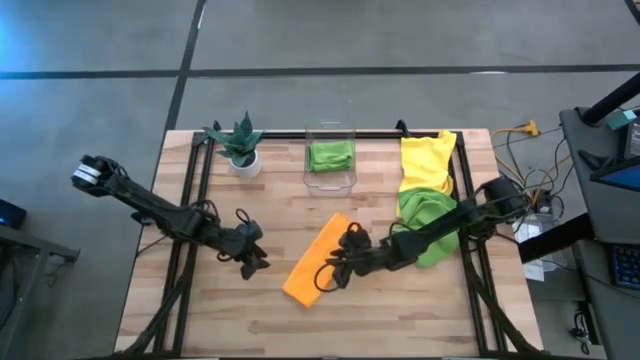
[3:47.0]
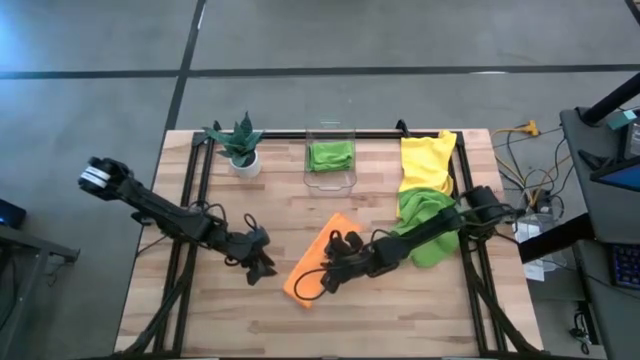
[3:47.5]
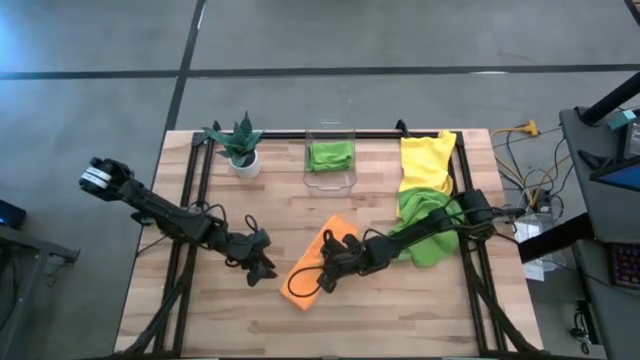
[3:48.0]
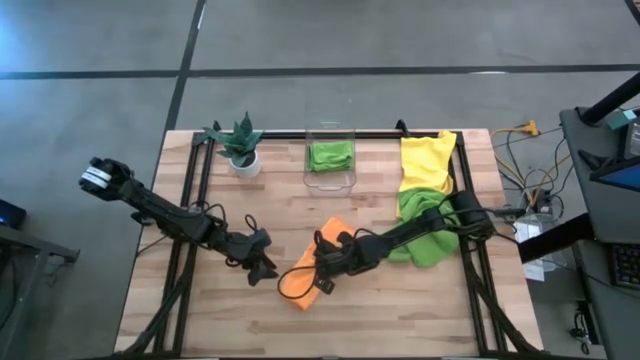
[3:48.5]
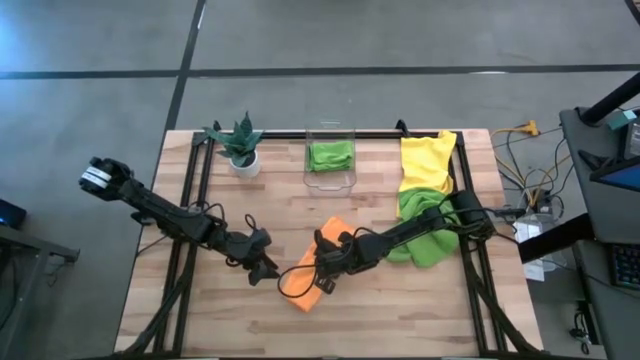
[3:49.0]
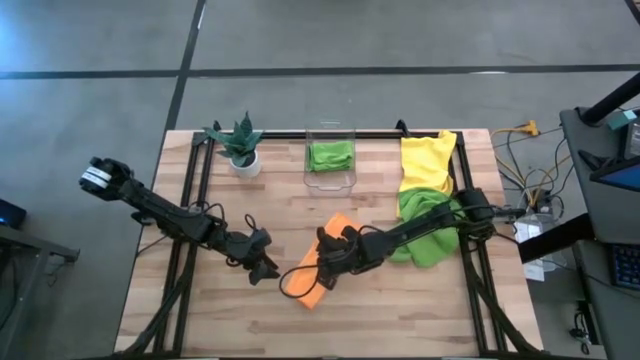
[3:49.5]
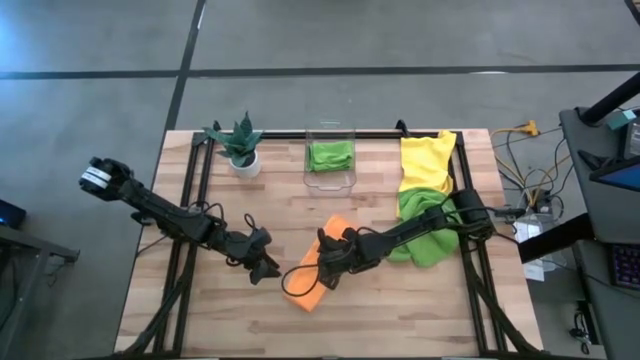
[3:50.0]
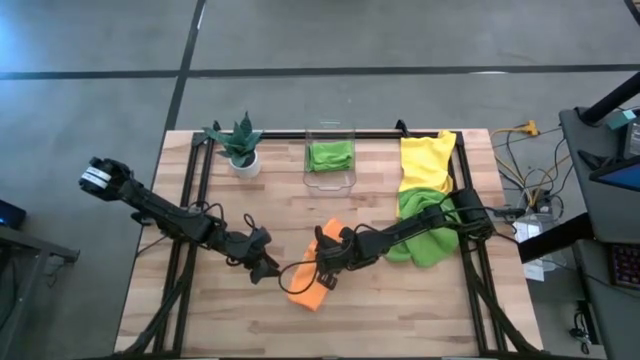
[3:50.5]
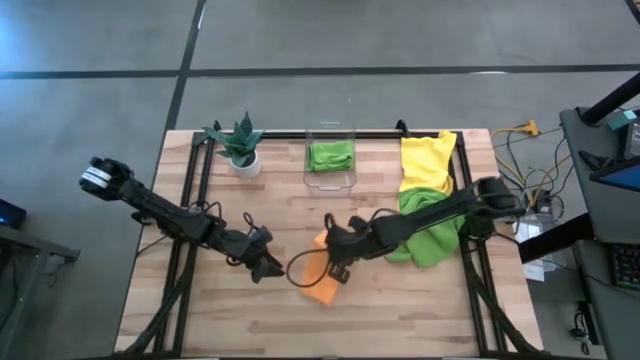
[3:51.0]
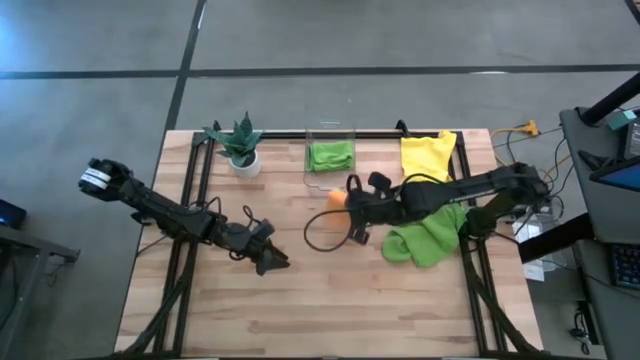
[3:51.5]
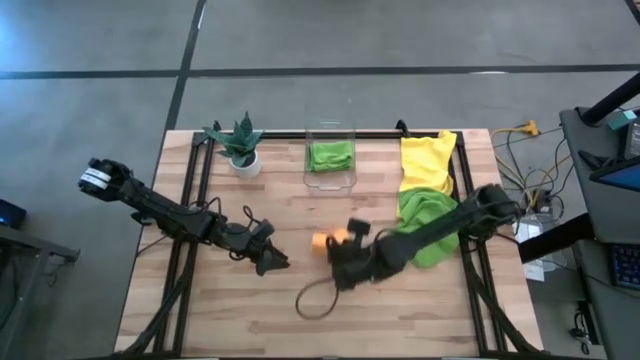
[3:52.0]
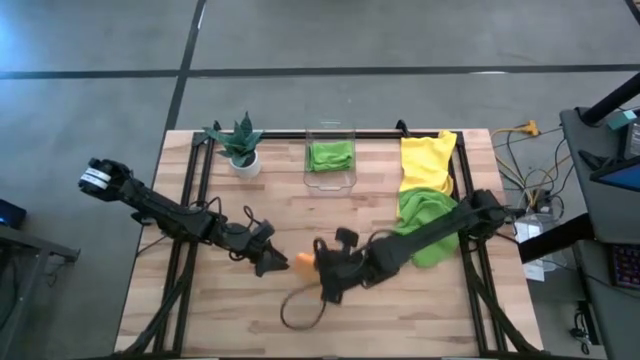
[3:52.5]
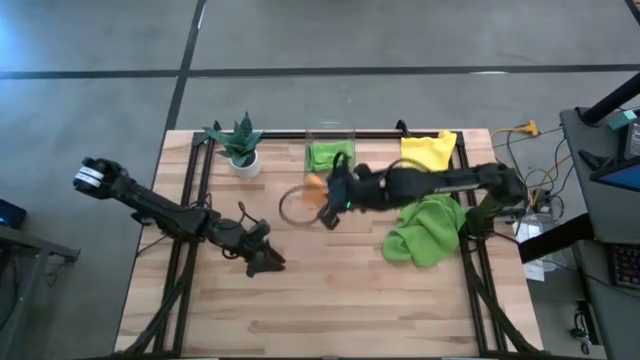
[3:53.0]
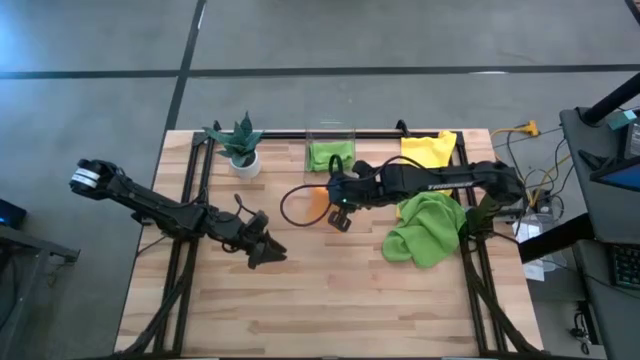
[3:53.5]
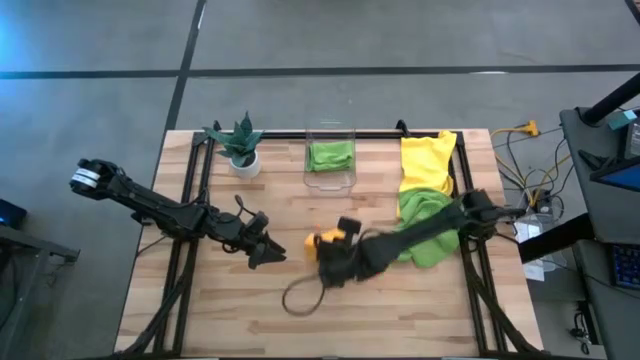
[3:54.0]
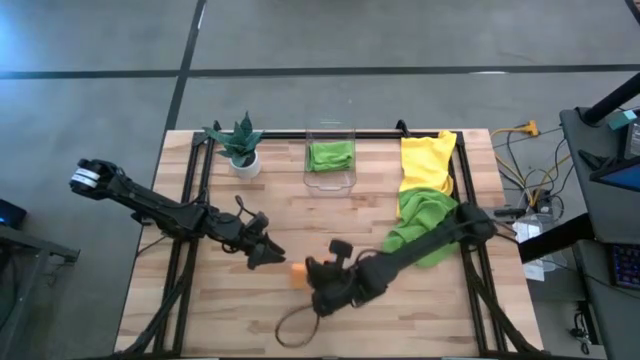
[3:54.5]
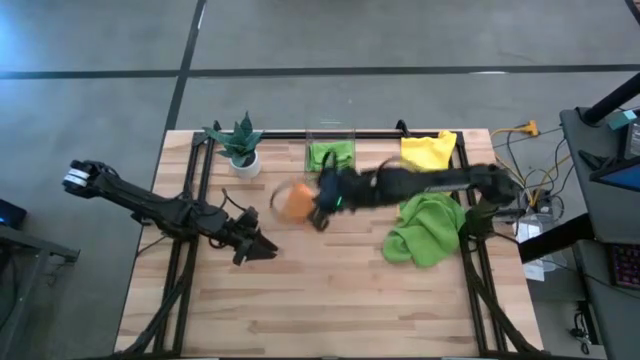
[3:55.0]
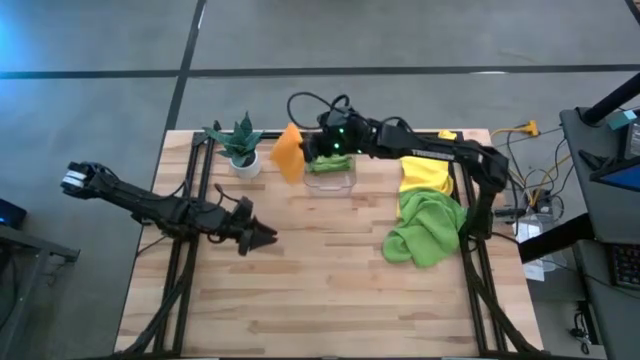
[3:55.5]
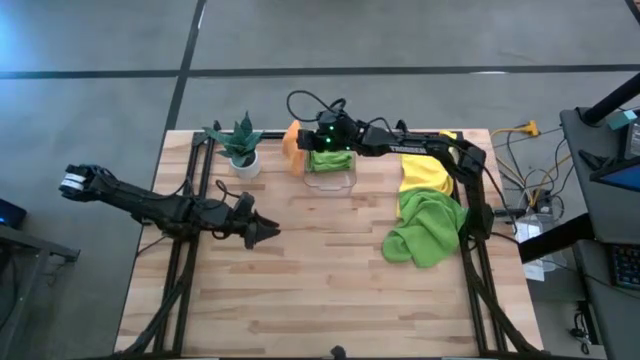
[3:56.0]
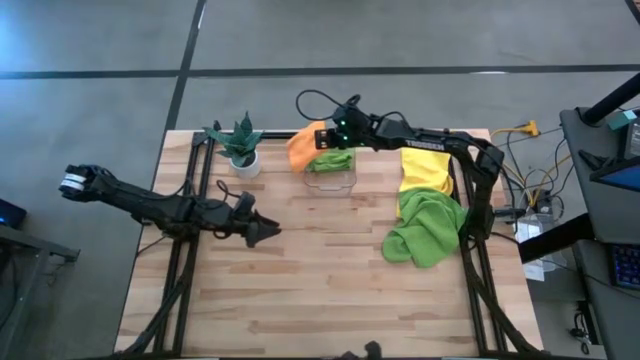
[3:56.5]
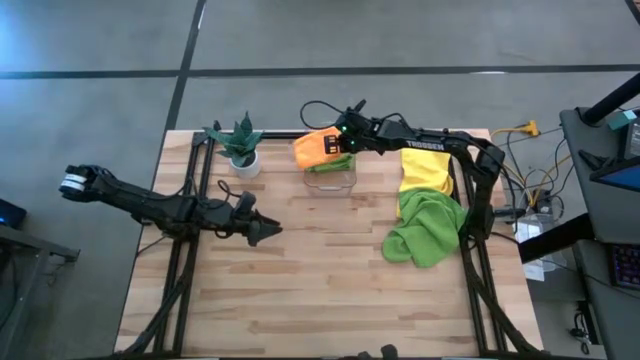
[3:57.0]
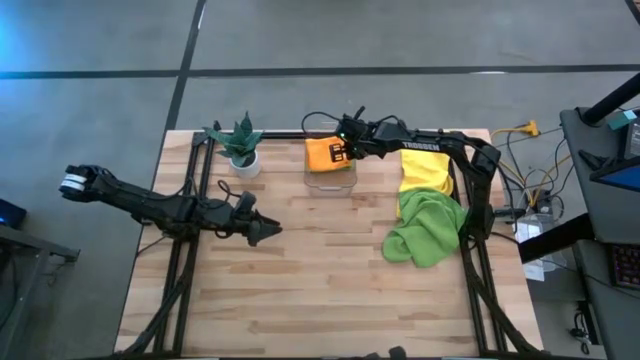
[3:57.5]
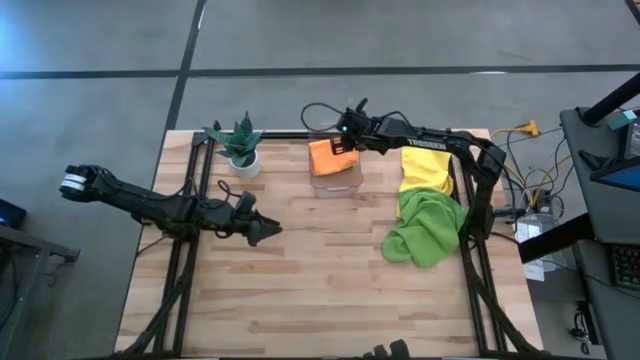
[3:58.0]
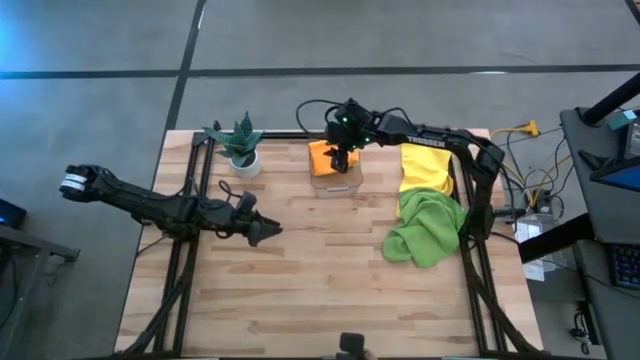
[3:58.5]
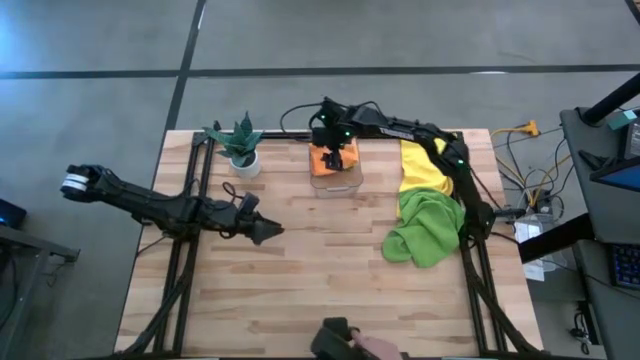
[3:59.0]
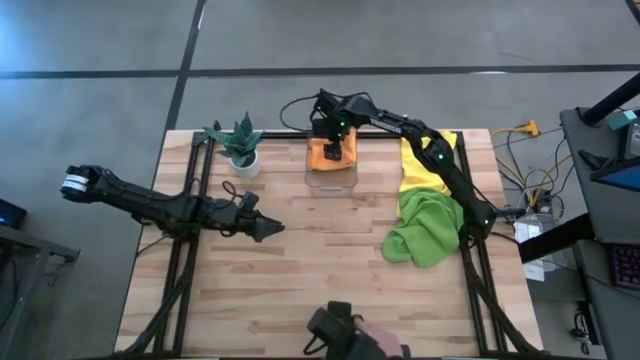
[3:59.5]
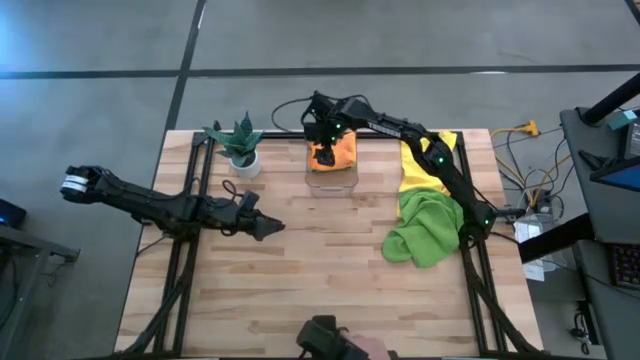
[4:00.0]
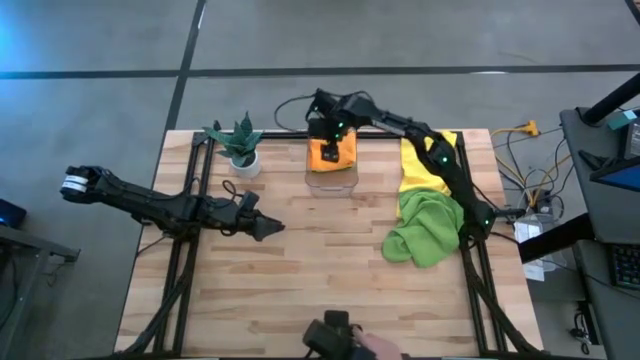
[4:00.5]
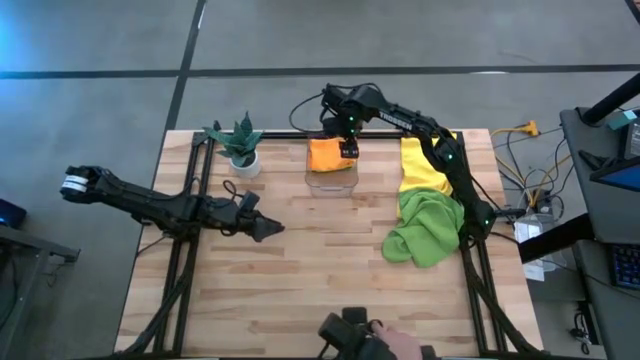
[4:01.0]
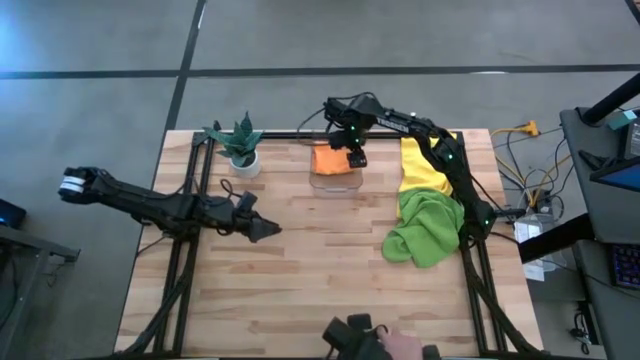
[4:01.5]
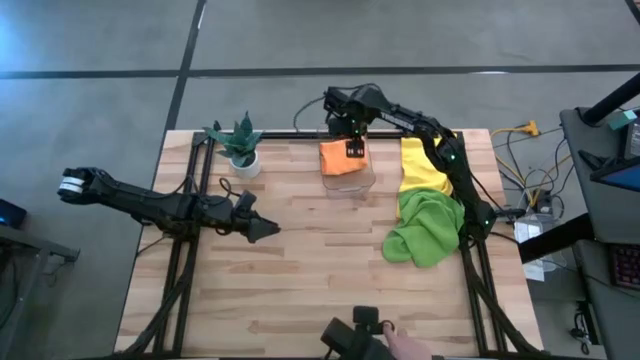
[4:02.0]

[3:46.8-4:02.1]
Task: Fold microfiber towels
Put the folded orange towel into the transparent bin

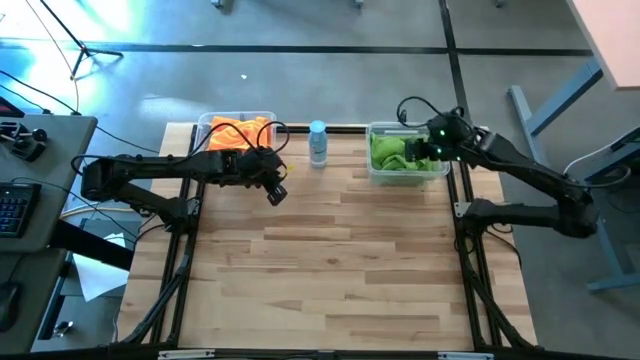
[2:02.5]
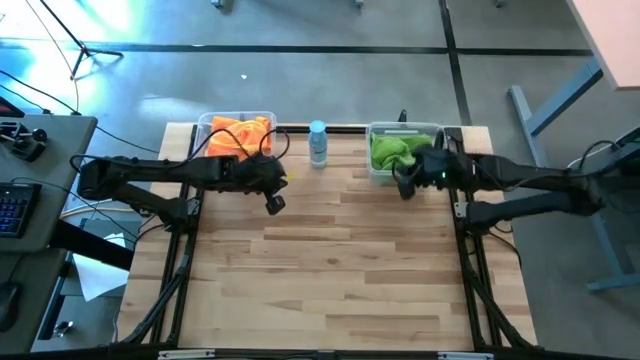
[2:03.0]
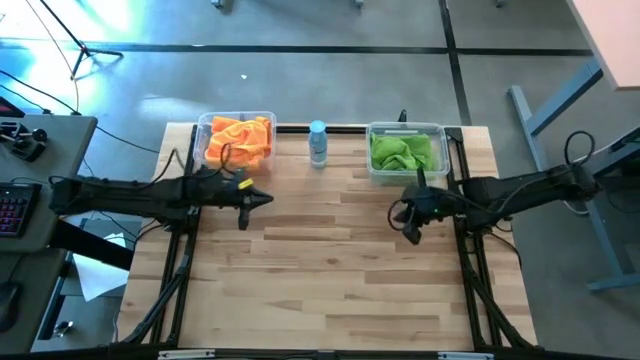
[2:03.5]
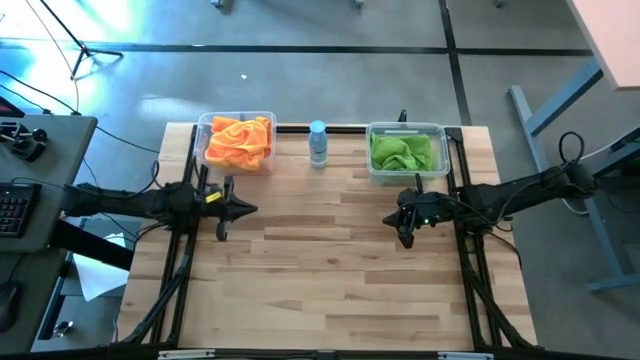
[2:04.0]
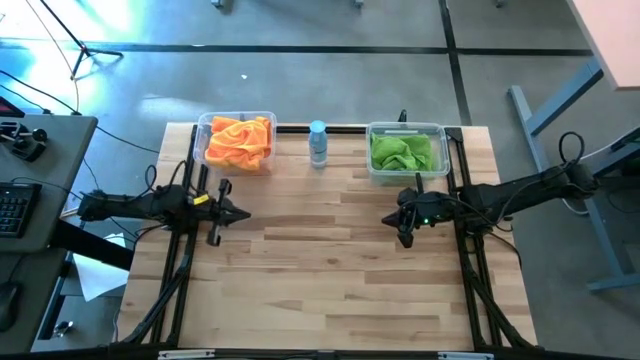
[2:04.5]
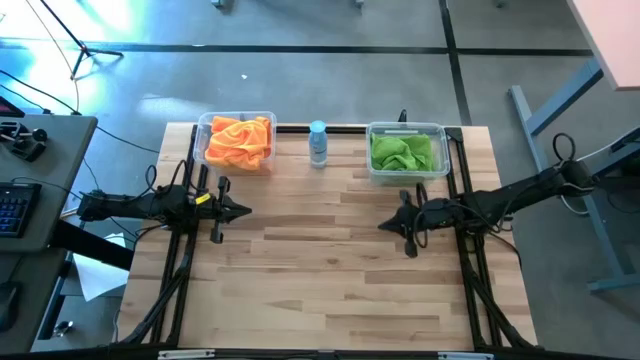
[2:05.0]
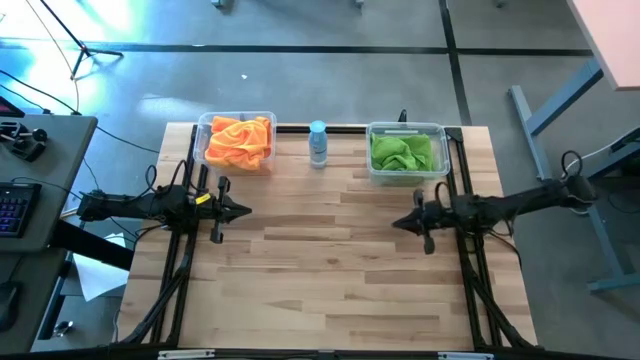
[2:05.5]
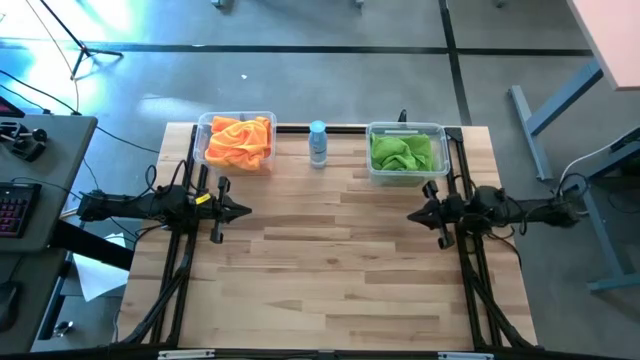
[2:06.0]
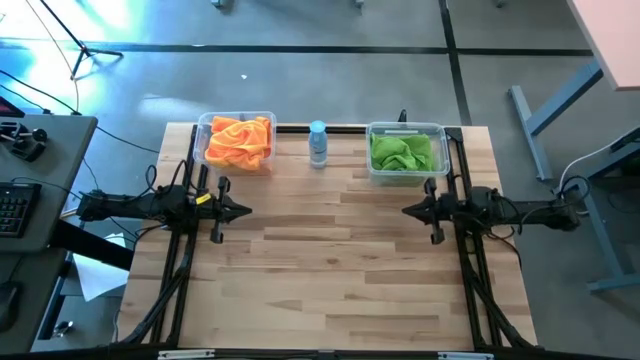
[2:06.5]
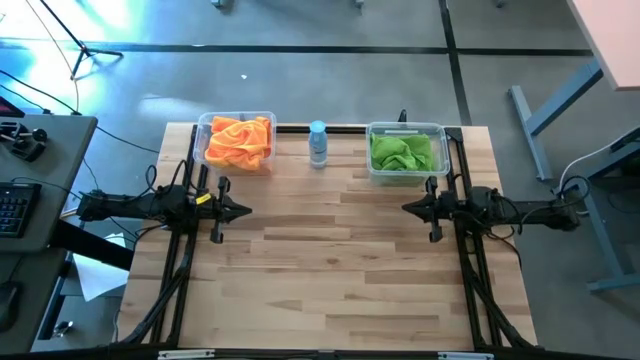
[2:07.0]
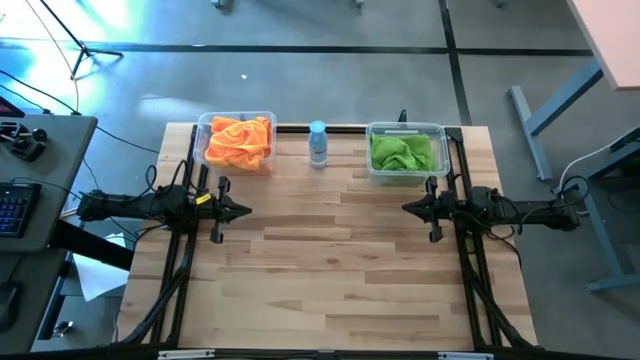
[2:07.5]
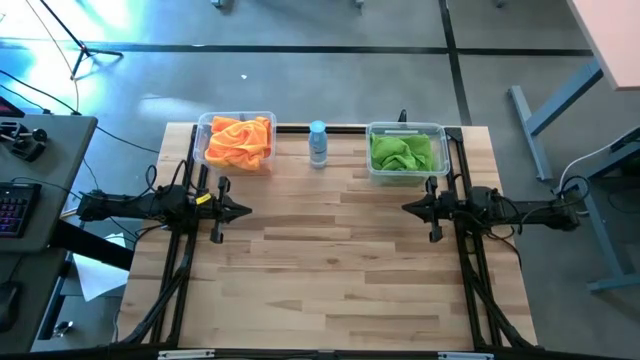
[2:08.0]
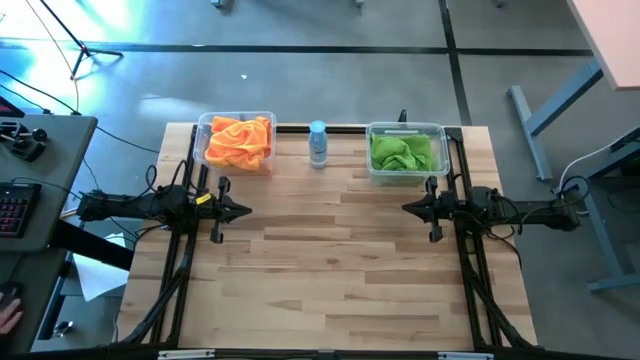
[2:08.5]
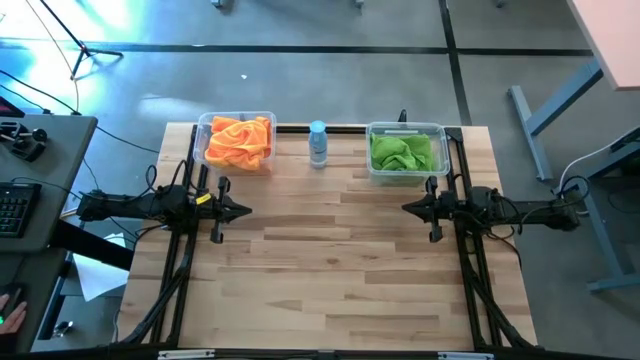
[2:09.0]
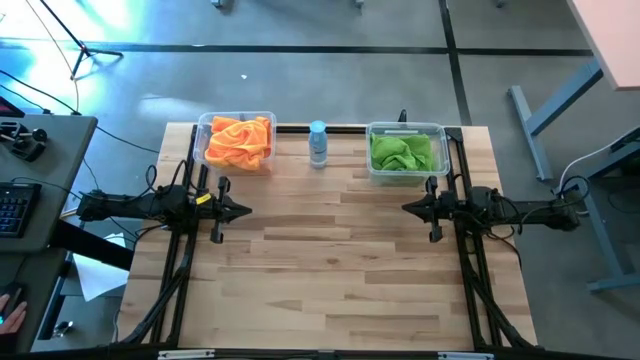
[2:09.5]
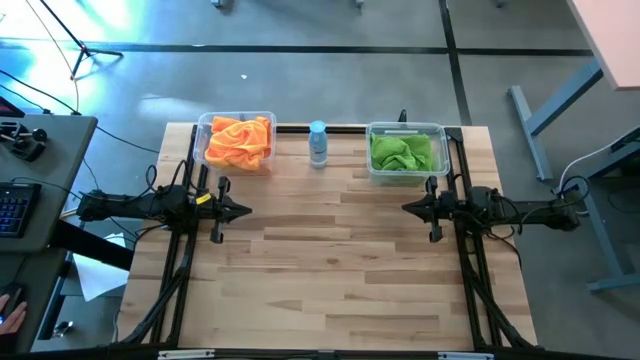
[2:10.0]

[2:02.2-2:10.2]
Task: Sort microfiber towel by color & place in baskets
Return to Home Position
